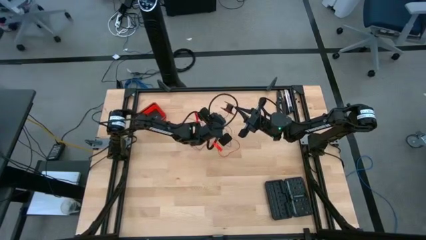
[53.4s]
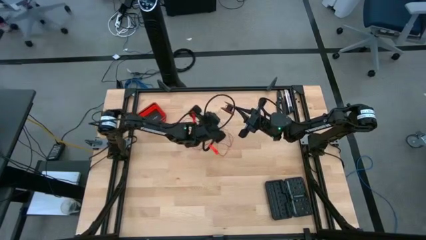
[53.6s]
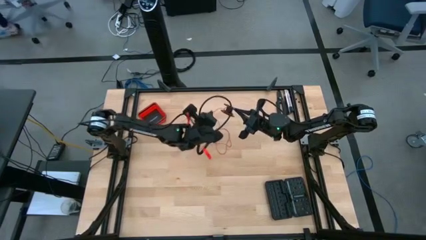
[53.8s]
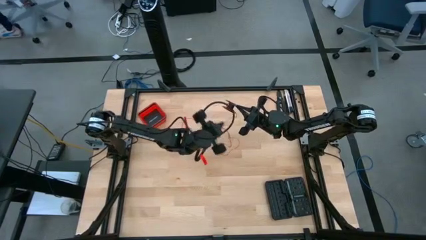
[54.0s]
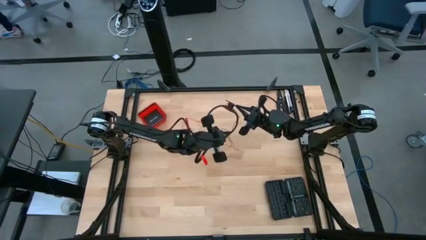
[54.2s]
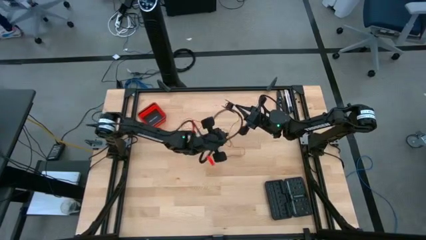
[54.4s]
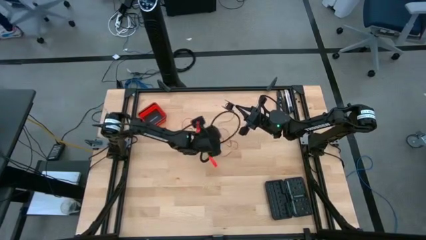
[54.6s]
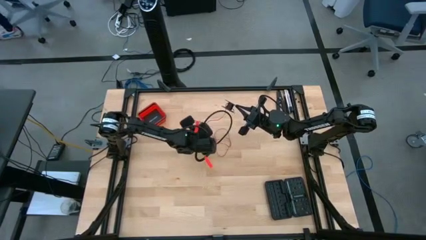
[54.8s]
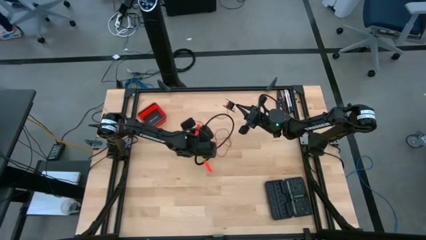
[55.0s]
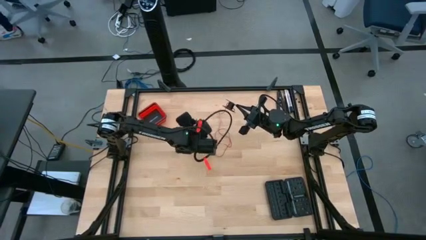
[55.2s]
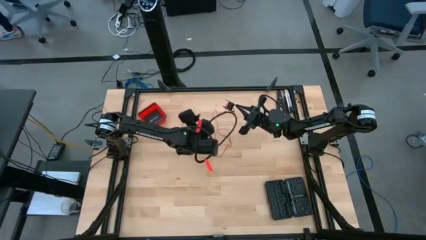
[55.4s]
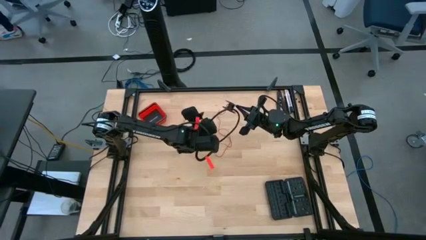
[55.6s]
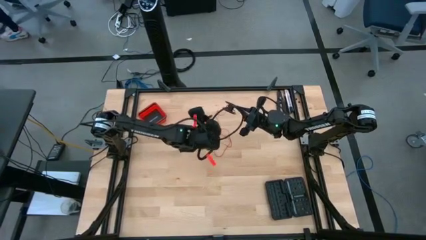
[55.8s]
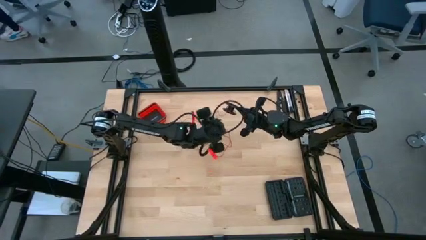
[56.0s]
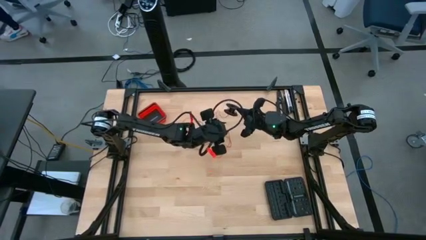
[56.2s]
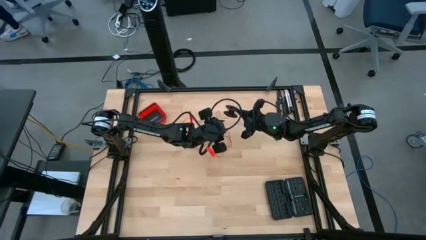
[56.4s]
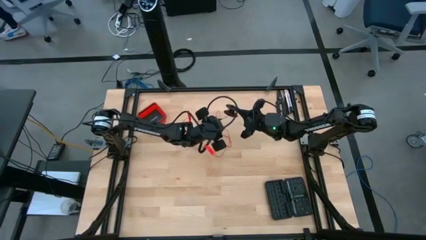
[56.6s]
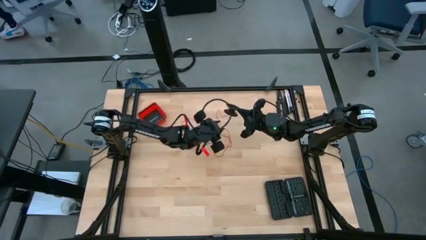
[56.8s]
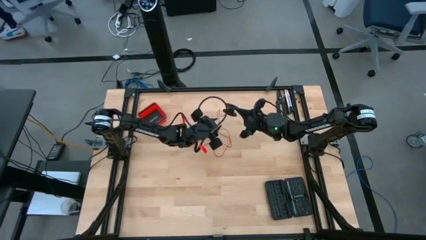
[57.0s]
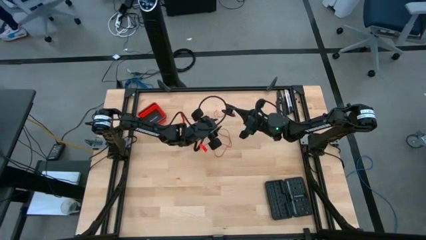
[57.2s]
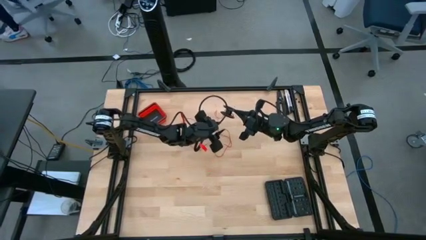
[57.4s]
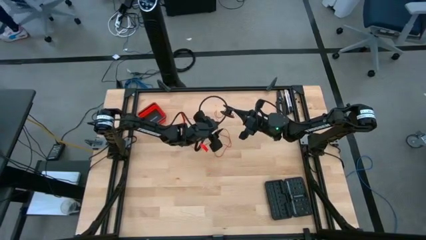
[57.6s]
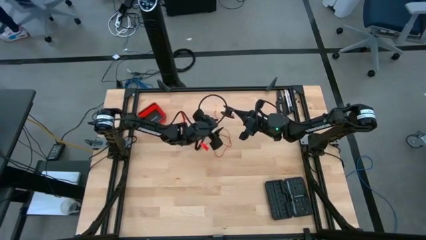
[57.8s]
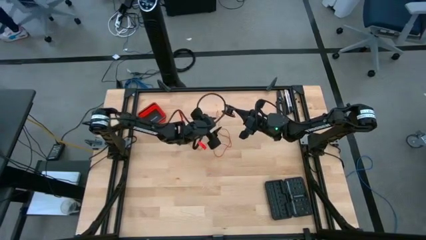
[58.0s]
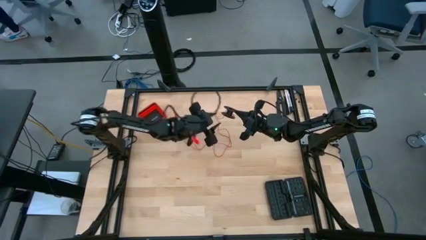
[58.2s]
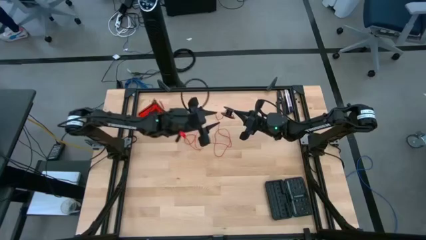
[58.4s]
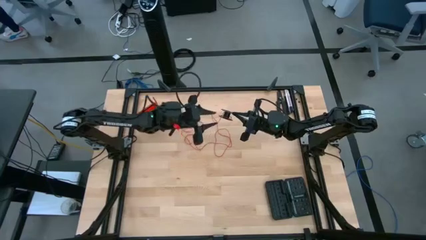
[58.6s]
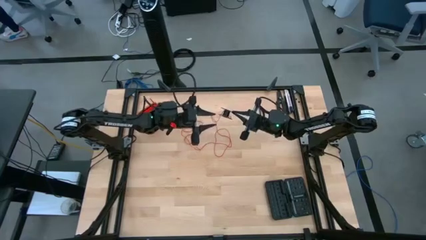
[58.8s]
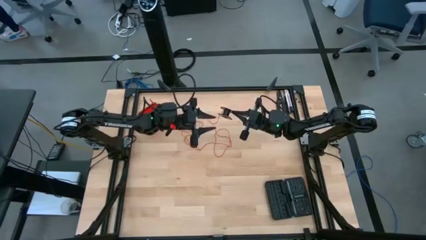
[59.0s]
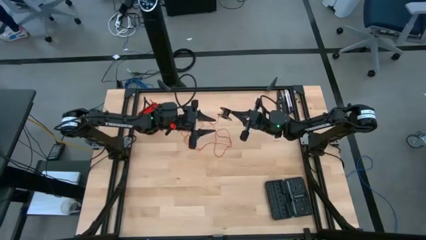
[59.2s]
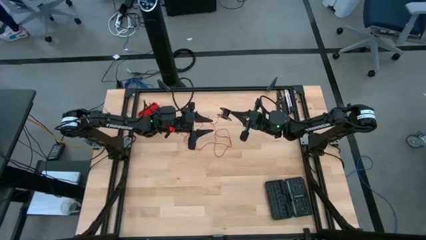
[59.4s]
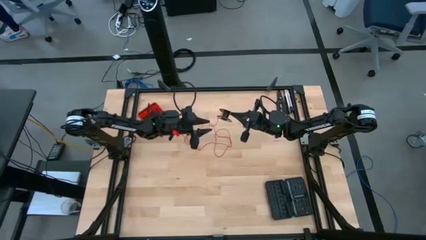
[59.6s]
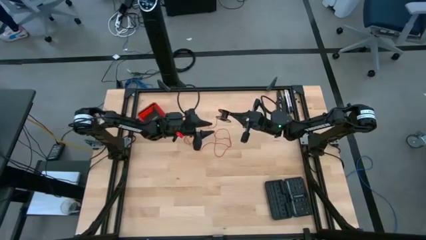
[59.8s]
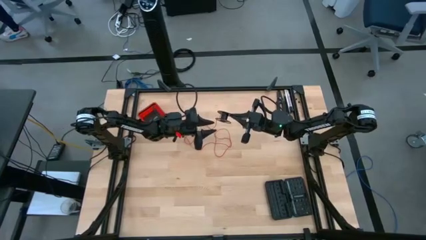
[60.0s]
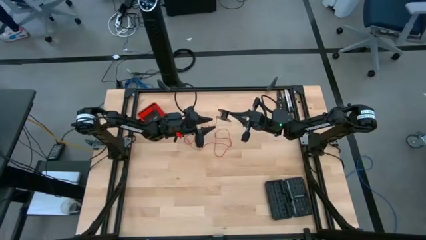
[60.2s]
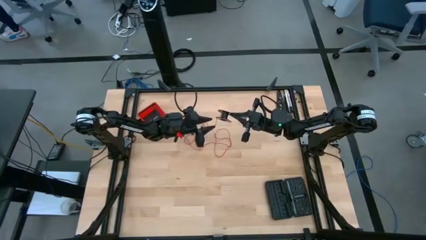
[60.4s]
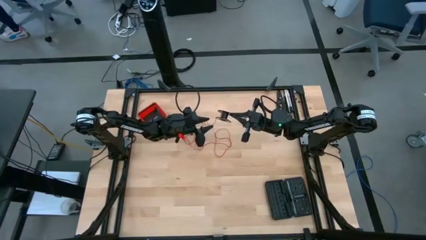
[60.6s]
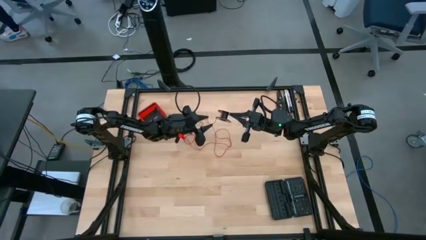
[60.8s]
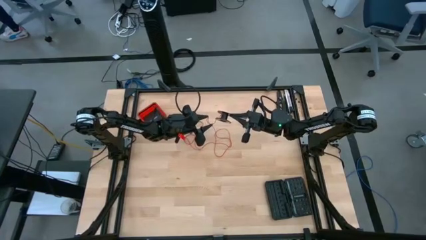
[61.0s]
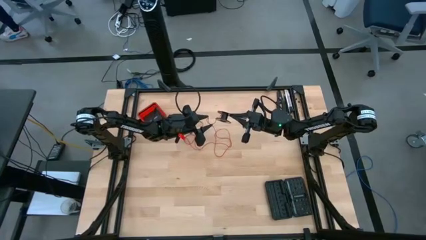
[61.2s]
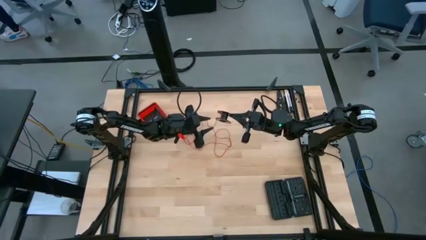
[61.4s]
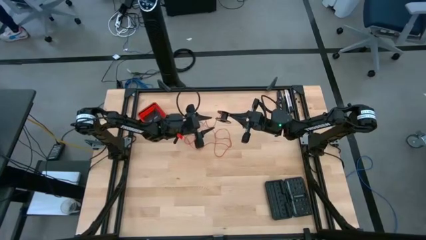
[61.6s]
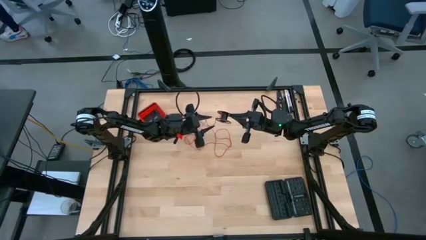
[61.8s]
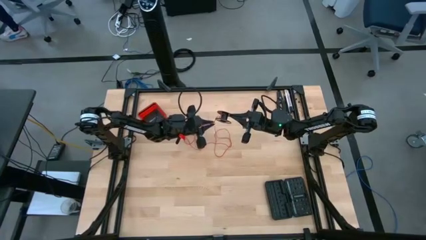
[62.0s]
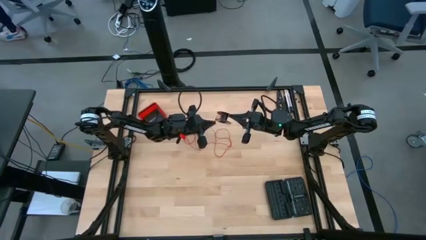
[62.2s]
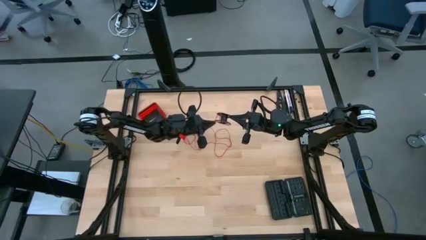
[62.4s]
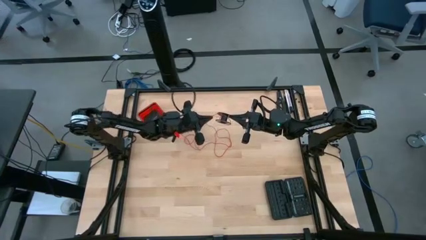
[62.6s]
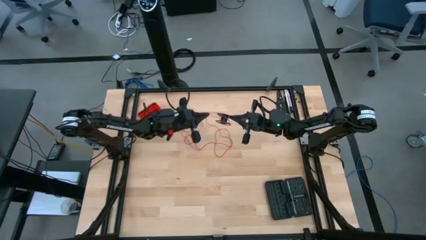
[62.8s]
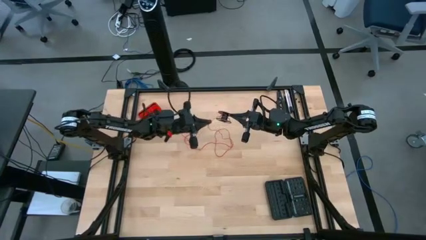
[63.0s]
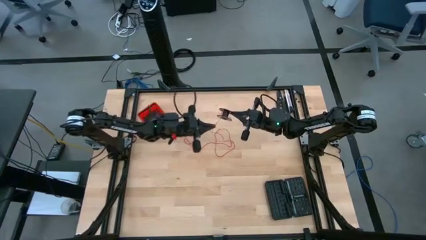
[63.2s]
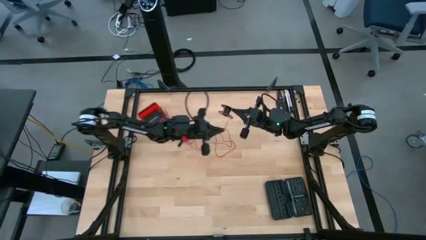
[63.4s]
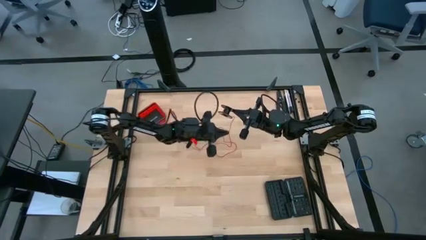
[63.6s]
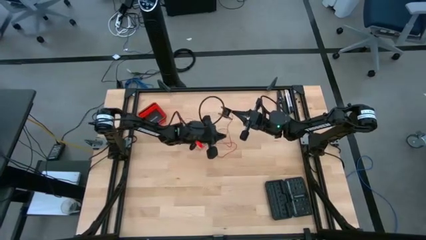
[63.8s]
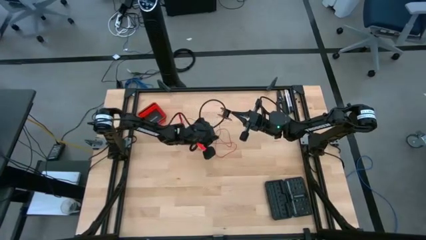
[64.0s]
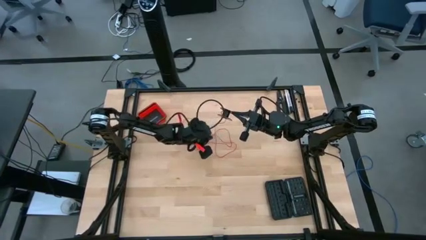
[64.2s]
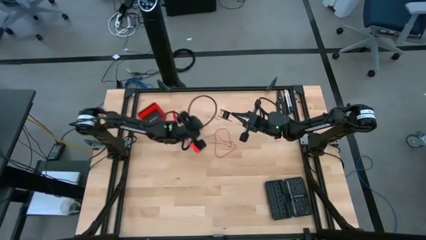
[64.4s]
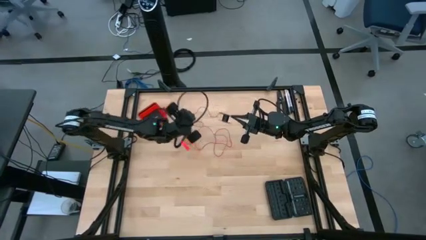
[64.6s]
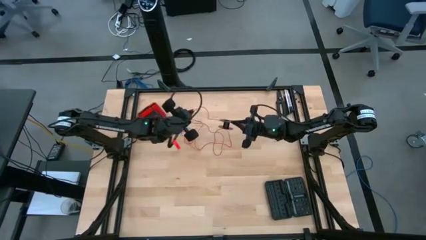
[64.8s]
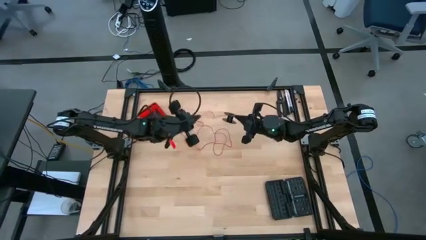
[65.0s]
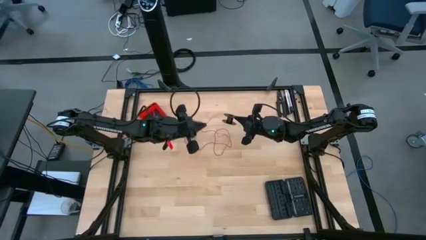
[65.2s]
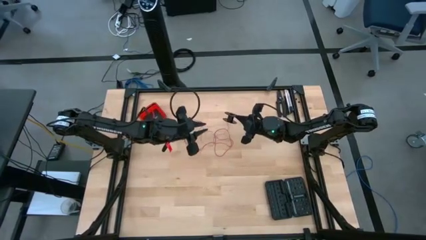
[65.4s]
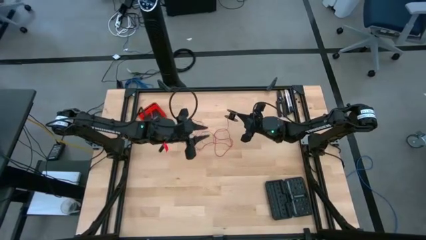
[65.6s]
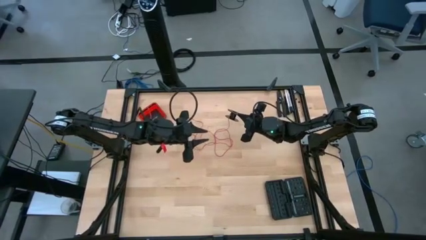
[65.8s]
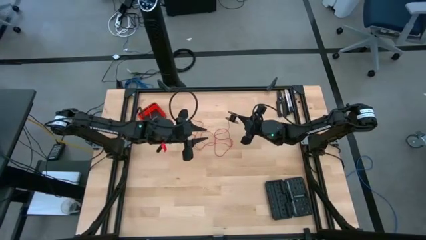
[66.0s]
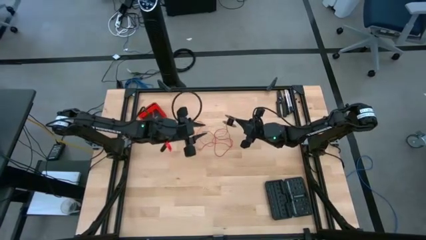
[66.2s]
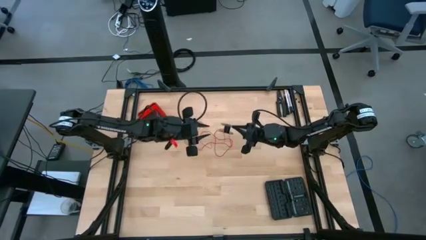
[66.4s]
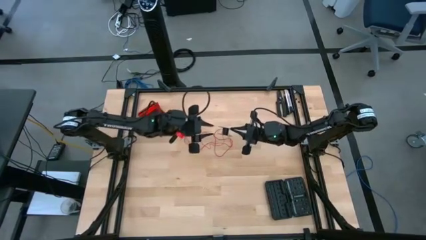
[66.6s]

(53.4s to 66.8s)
Task: Coil cords
Uncoil the wire to the spool
